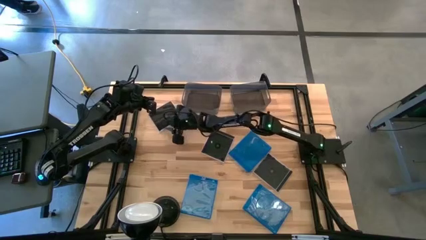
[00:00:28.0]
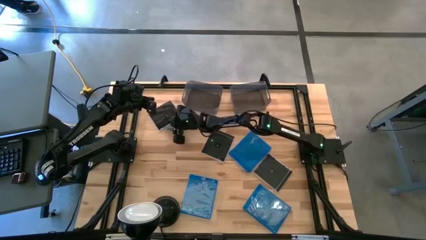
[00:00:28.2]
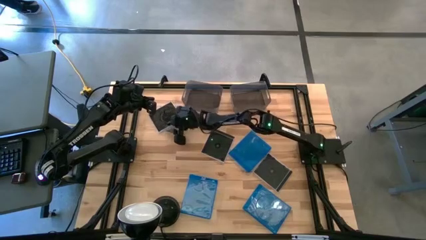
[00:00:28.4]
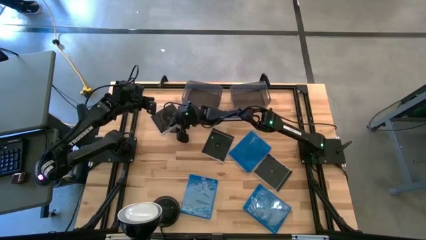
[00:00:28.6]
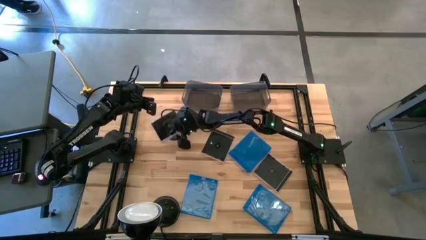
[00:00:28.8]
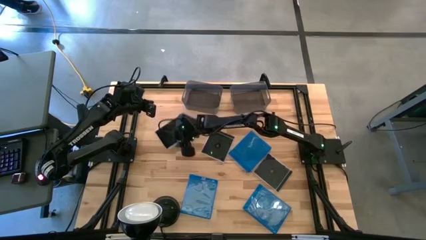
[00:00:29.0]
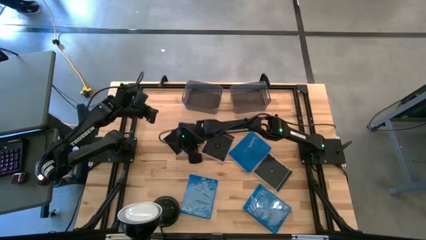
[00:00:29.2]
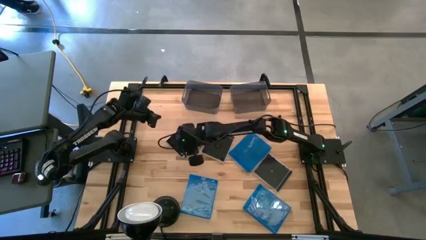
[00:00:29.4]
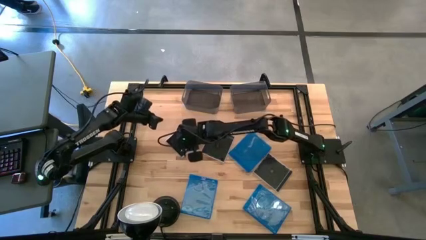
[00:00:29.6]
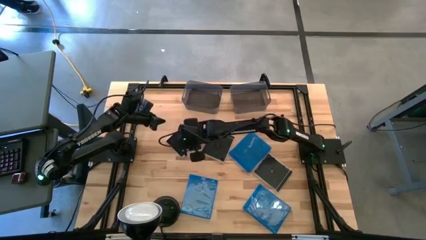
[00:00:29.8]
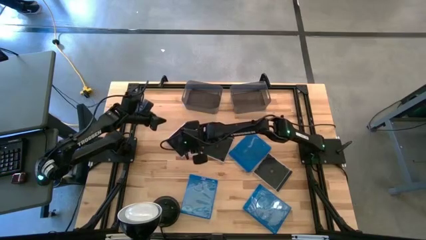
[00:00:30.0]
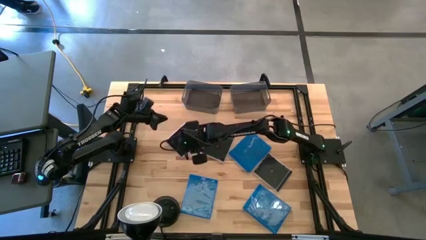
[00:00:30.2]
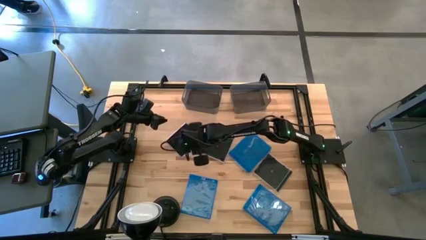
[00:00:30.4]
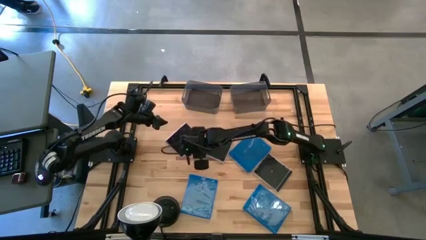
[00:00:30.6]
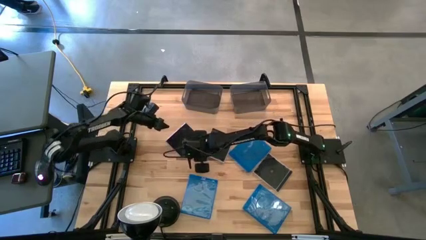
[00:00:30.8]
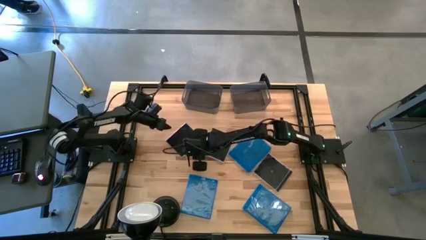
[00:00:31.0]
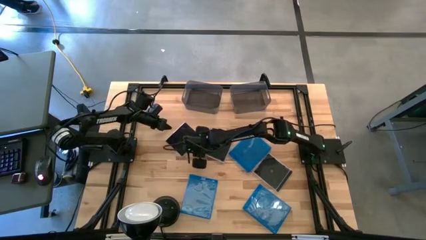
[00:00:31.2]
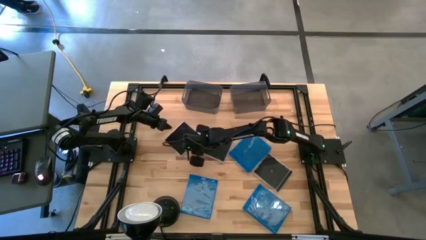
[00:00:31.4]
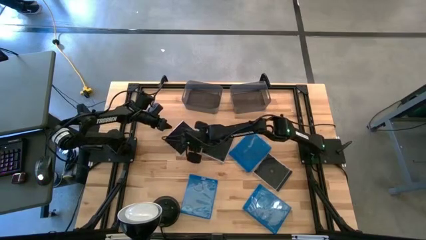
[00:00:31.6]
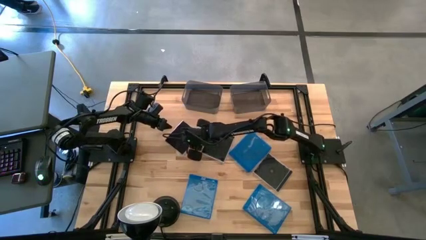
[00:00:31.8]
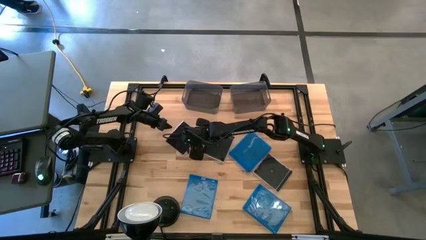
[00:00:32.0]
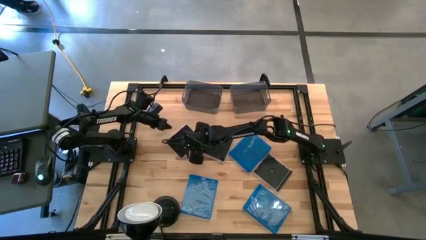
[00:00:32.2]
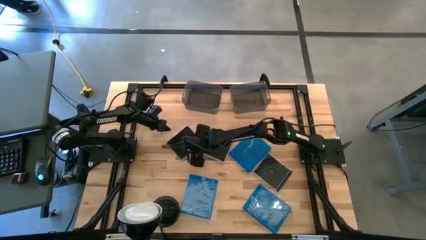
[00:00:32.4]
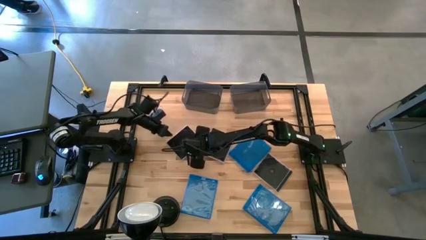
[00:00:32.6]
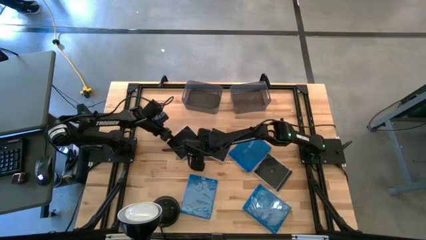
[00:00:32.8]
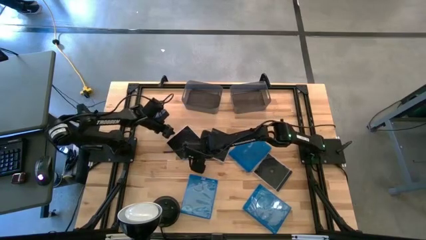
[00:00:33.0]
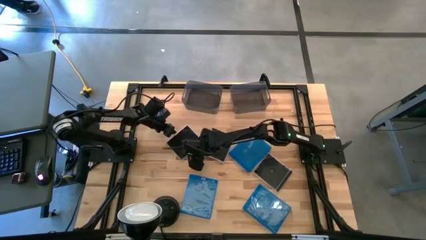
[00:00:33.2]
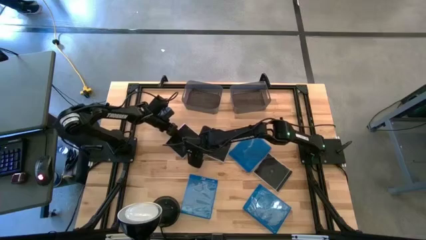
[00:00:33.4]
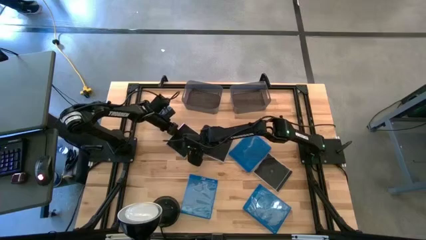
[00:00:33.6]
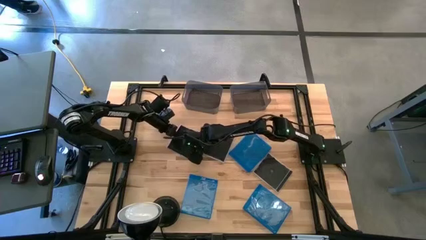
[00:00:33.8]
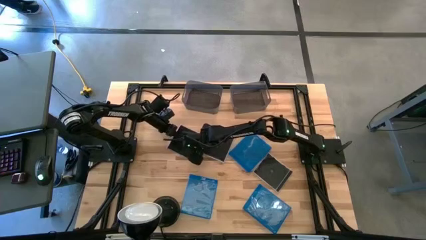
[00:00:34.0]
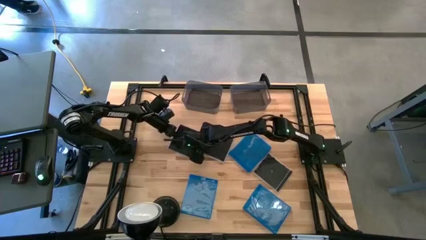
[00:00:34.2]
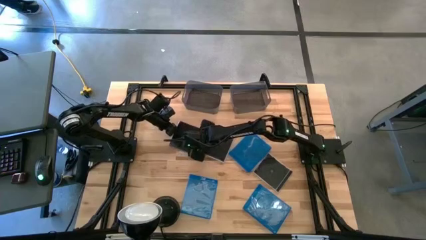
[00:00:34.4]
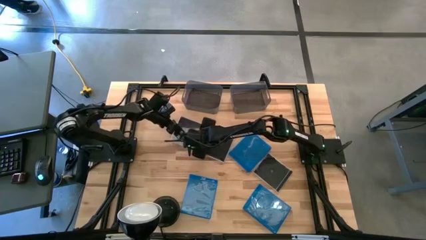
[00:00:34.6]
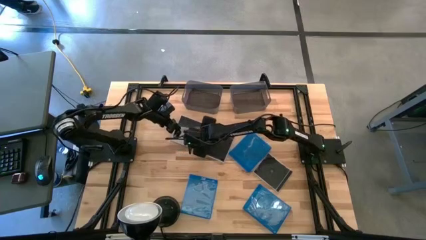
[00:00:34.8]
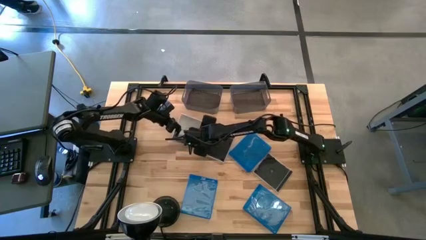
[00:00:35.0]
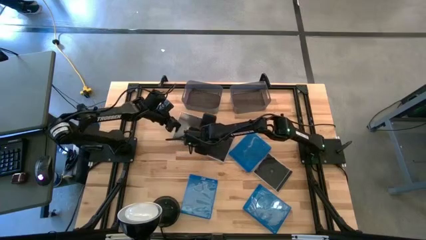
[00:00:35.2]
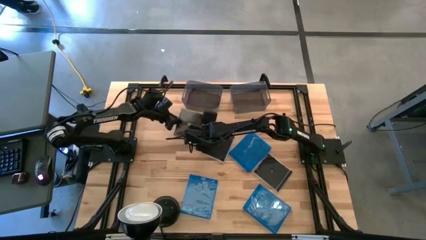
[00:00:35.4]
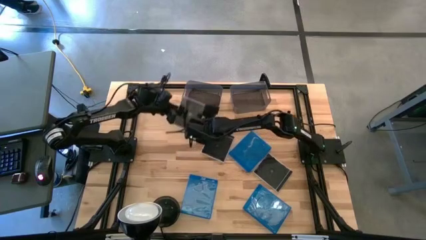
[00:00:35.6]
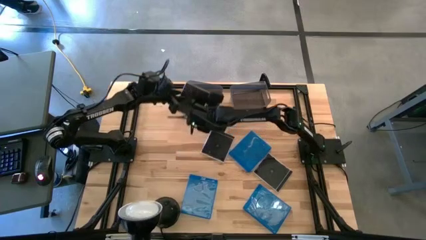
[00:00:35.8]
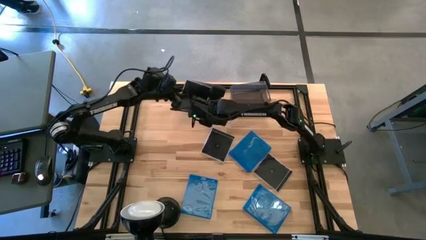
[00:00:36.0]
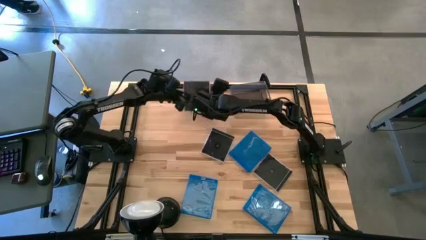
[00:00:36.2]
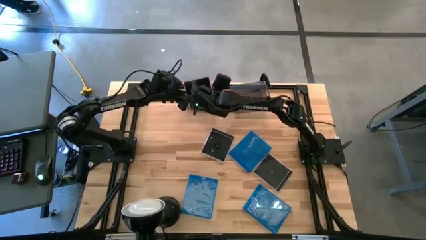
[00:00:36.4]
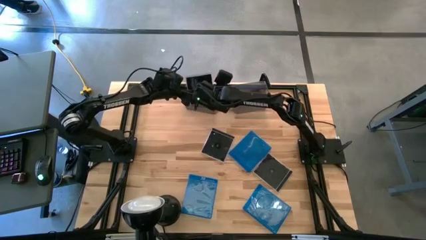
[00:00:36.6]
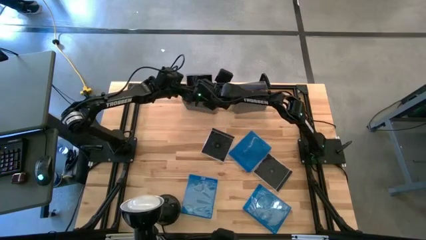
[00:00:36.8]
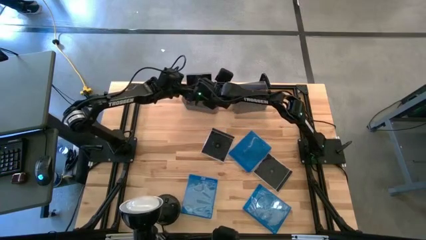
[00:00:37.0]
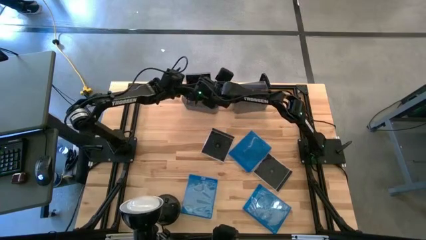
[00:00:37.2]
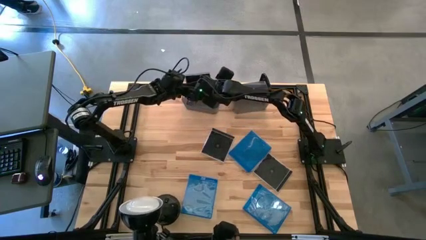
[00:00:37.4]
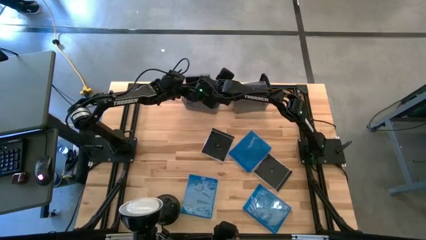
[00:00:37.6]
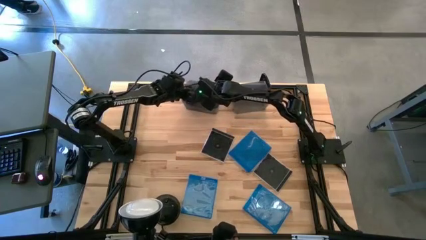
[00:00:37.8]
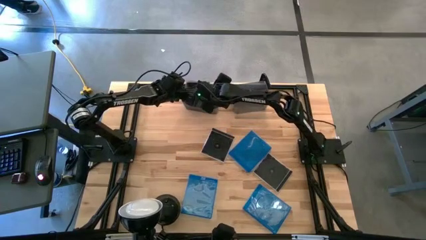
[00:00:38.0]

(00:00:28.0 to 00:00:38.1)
Task: Pick & place jewel cases by type
Put the top left black cd case into the left black bin

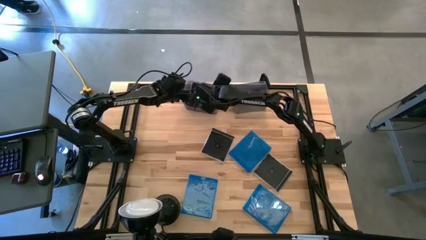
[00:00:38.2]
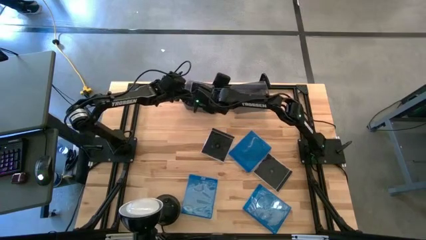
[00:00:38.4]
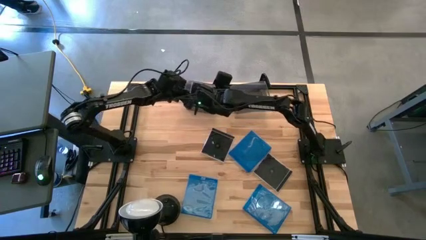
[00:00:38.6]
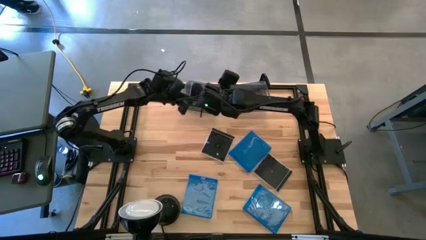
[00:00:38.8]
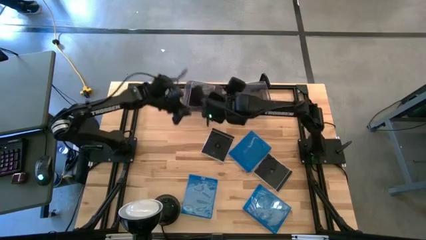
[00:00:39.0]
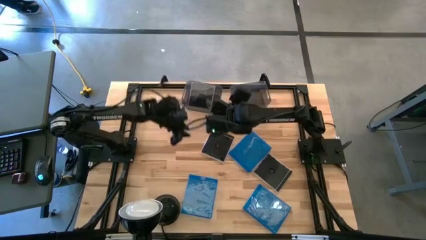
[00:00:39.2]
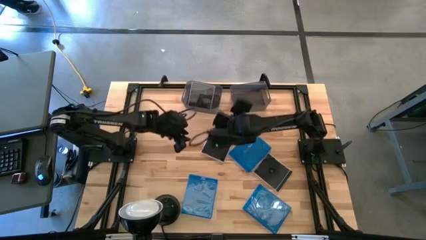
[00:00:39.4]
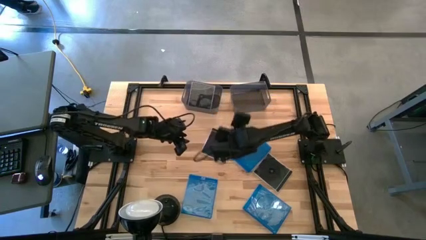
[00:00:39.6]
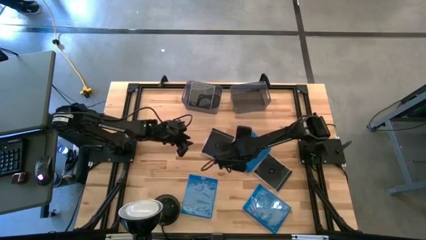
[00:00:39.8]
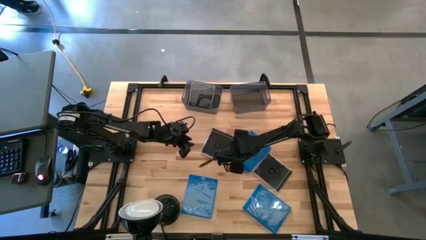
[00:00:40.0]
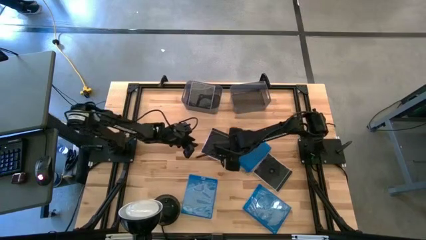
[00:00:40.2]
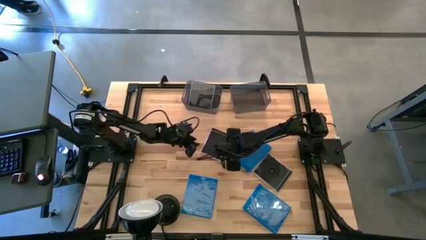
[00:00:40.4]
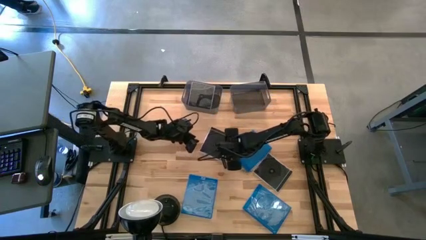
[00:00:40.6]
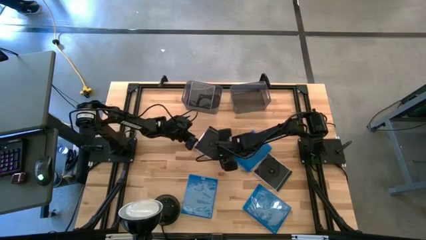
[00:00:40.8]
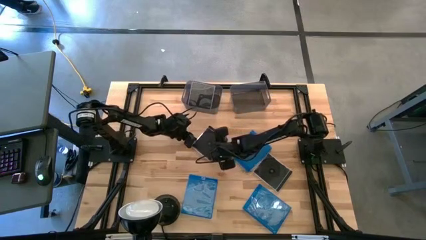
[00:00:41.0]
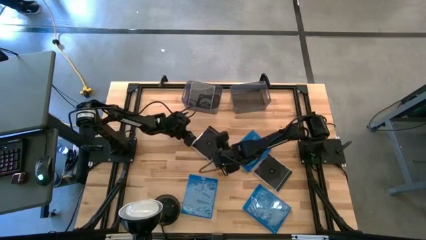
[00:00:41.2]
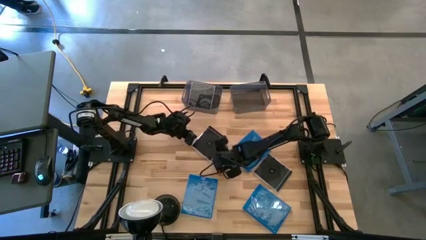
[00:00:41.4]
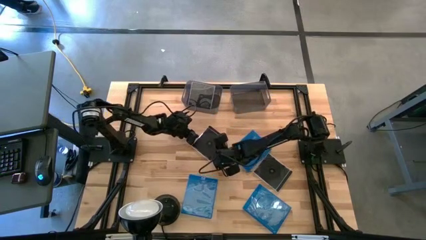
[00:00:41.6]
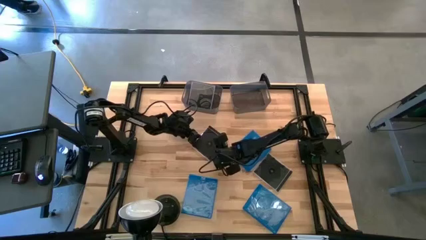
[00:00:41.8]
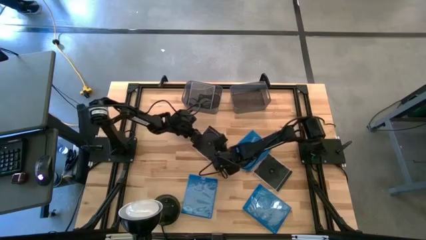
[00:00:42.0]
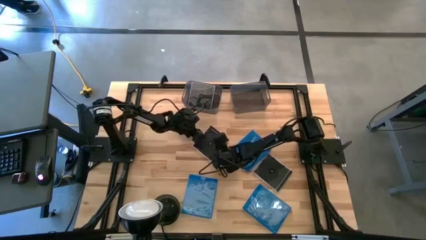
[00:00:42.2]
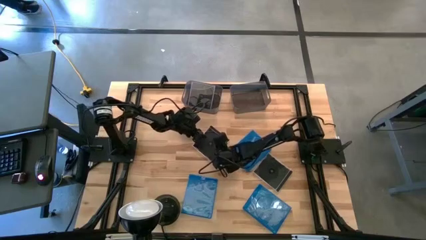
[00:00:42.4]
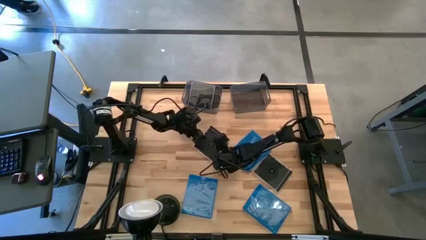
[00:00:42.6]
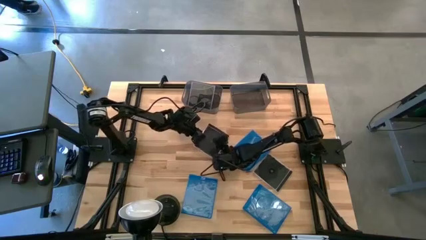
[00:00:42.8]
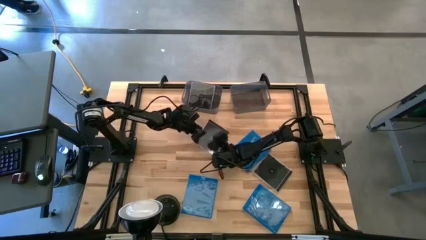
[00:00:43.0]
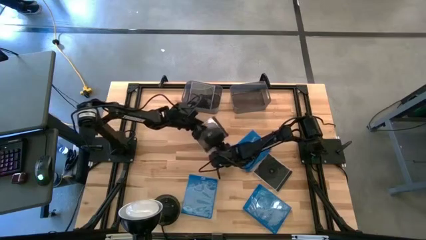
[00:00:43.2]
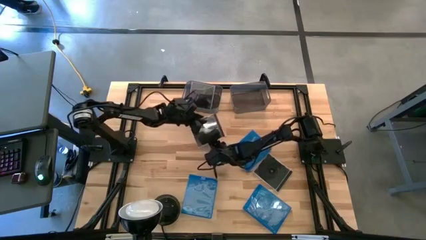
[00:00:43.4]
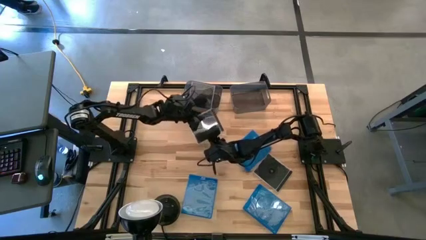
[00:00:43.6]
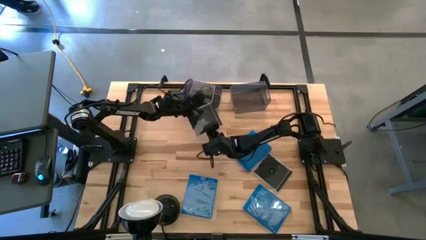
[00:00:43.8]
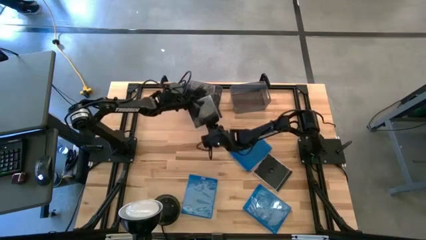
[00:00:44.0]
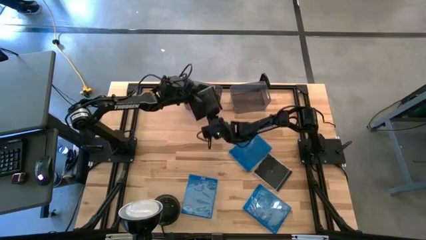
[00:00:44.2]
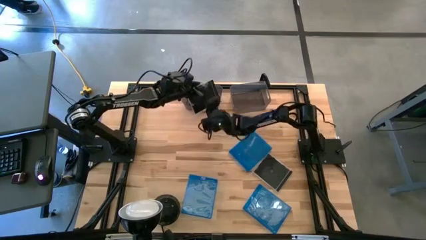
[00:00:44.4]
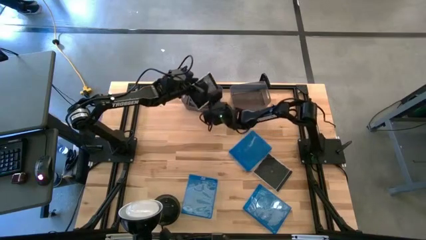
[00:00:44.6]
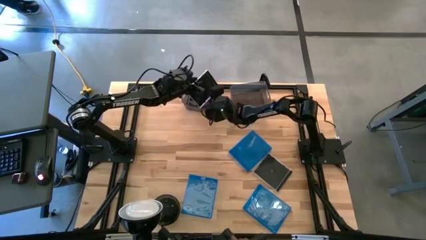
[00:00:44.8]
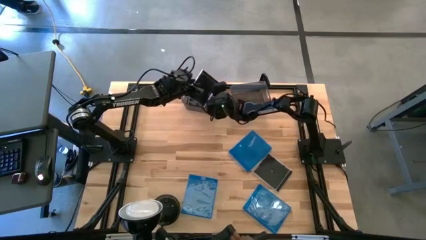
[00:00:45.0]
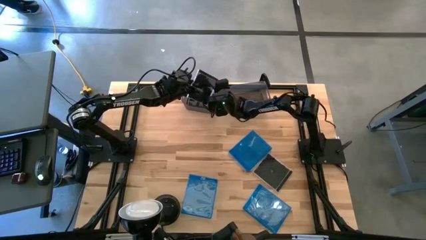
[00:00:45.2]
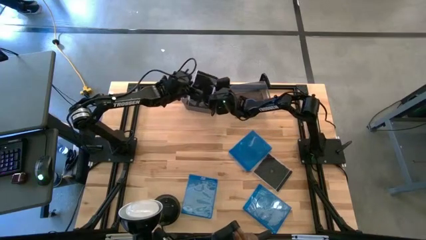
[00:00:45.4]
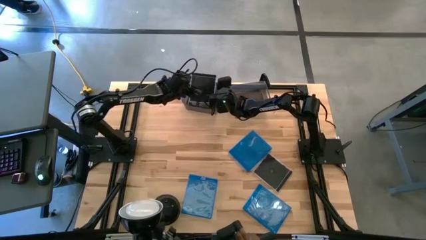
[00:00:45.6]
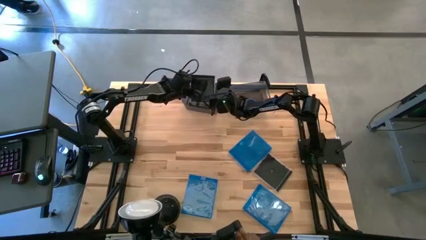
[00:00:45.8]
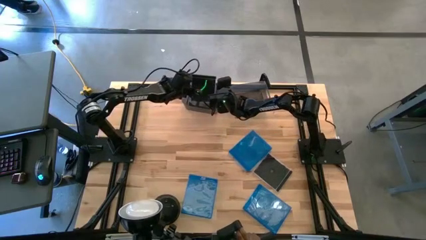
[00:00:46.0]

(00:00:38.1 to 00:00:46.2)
Put the top black cd case into the left black bin
